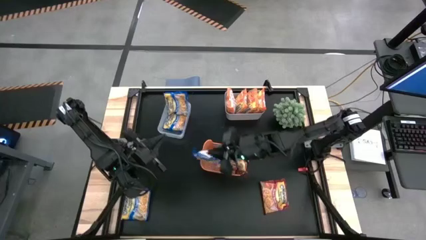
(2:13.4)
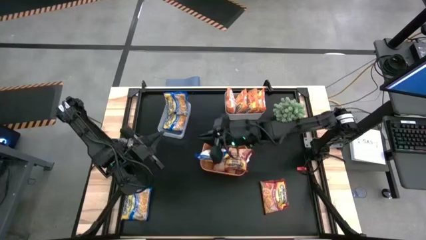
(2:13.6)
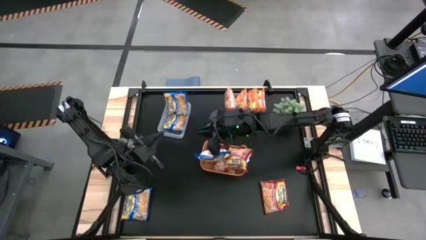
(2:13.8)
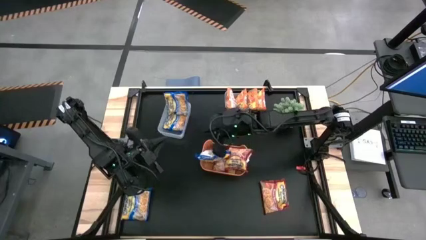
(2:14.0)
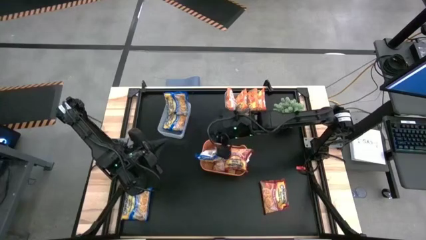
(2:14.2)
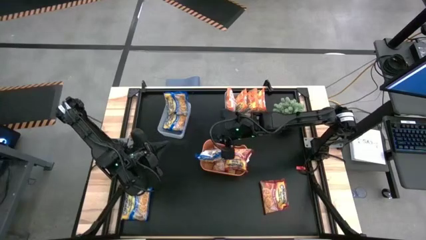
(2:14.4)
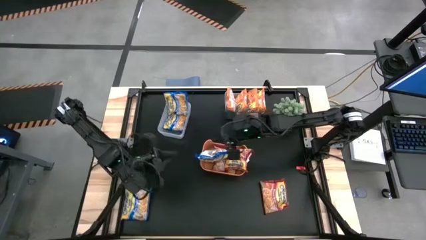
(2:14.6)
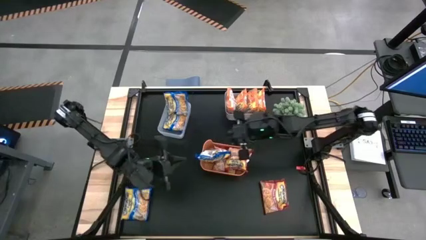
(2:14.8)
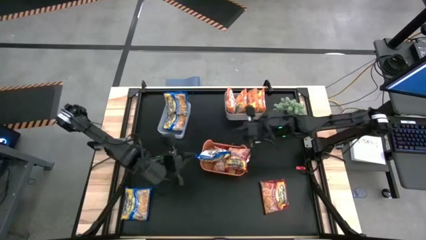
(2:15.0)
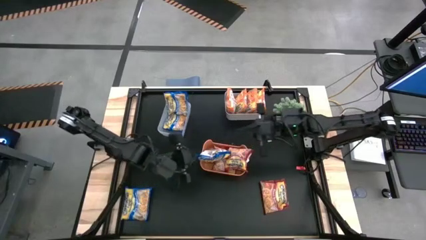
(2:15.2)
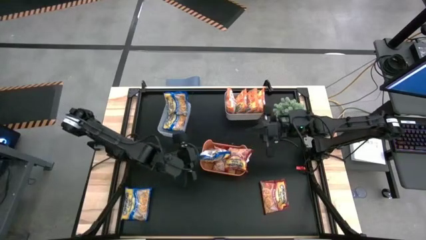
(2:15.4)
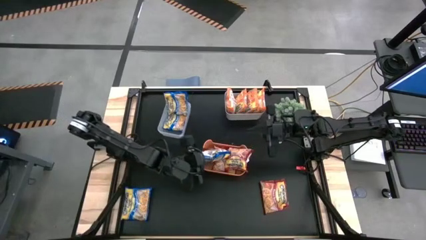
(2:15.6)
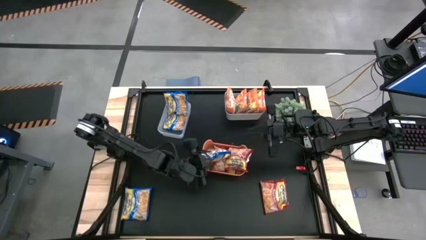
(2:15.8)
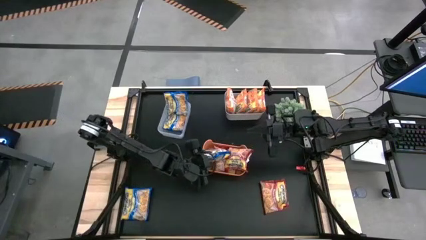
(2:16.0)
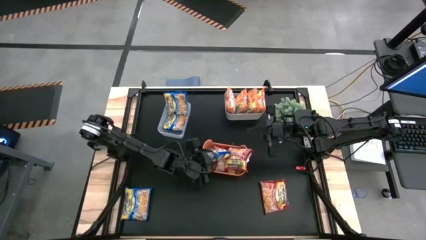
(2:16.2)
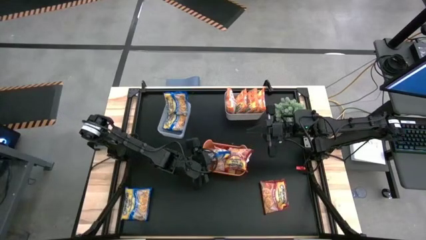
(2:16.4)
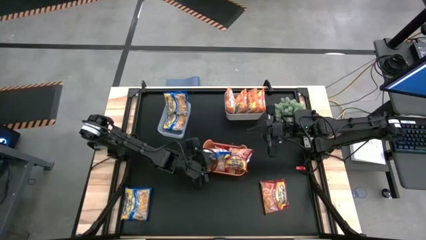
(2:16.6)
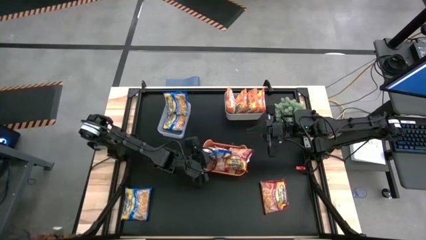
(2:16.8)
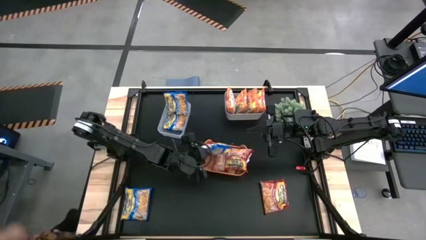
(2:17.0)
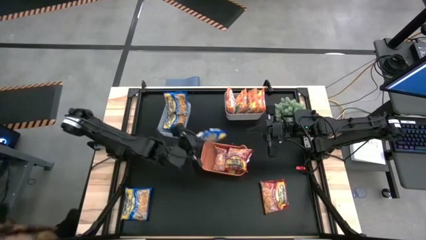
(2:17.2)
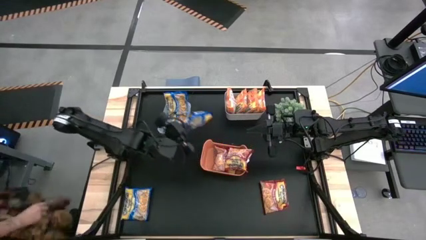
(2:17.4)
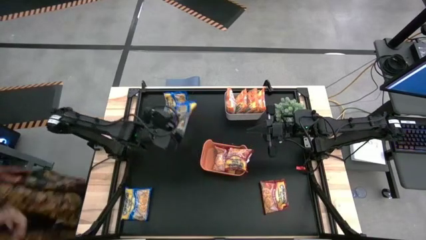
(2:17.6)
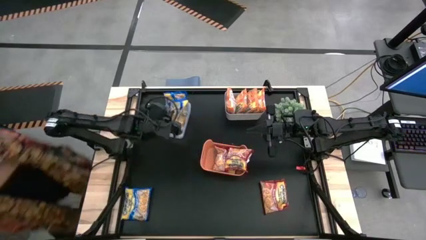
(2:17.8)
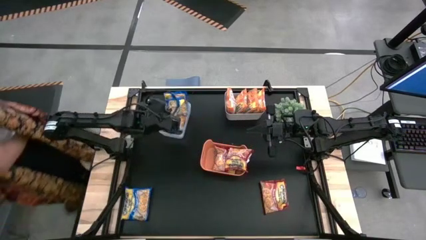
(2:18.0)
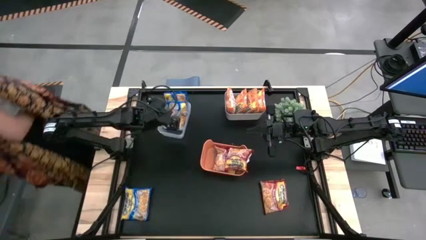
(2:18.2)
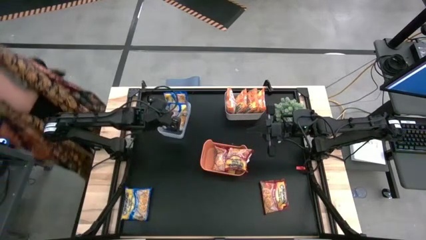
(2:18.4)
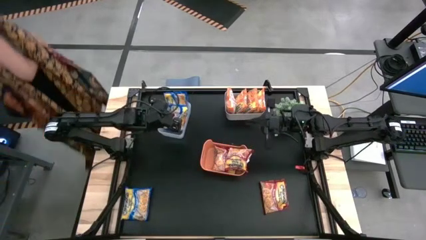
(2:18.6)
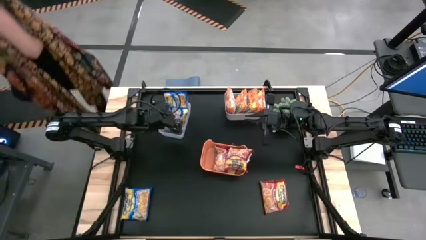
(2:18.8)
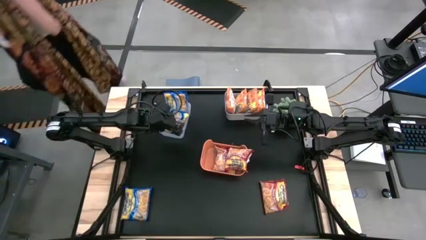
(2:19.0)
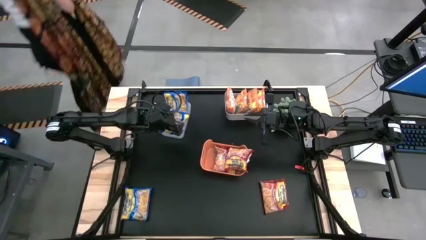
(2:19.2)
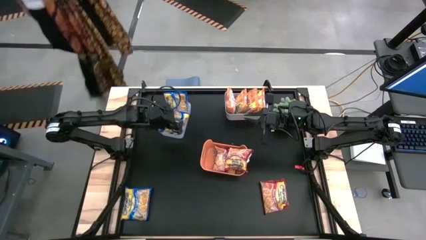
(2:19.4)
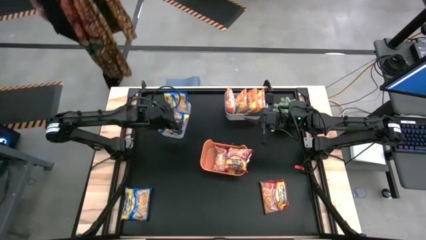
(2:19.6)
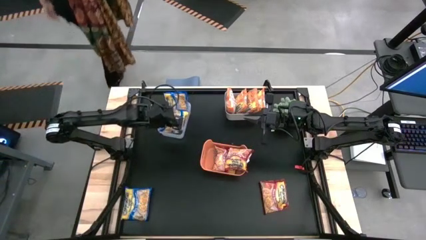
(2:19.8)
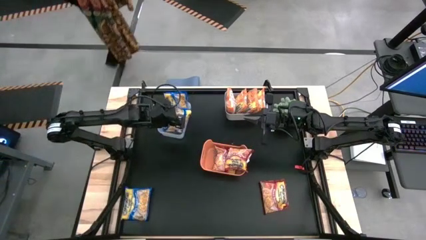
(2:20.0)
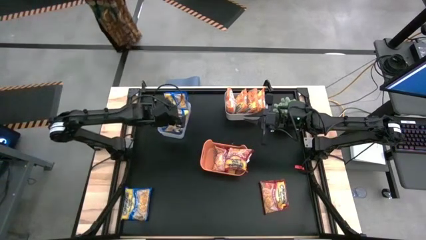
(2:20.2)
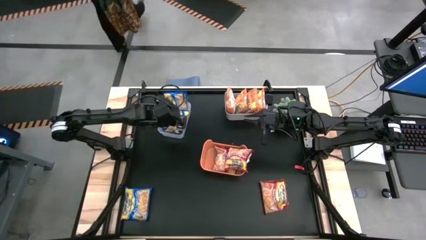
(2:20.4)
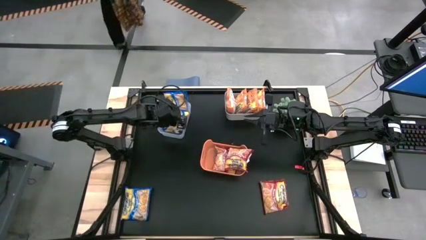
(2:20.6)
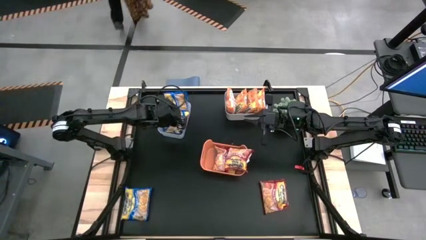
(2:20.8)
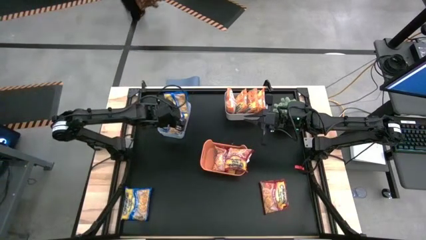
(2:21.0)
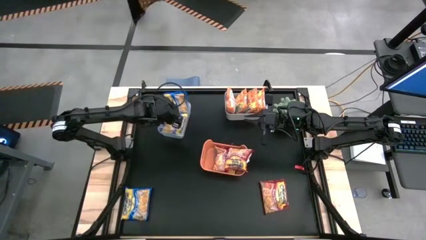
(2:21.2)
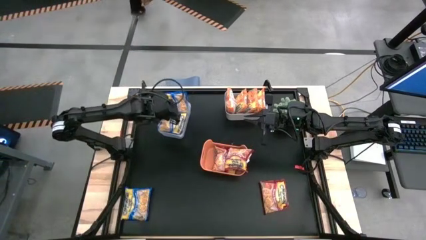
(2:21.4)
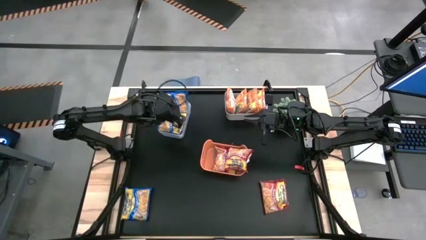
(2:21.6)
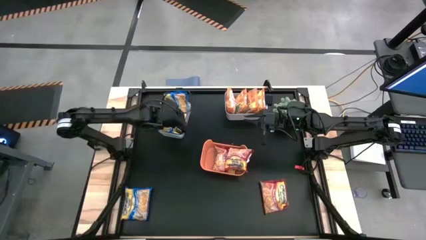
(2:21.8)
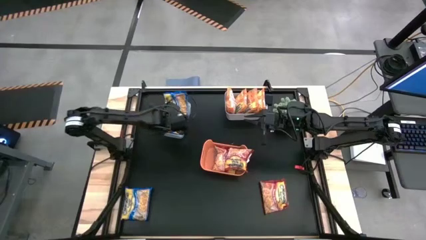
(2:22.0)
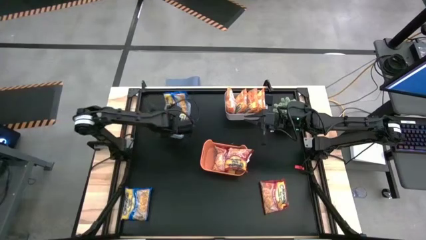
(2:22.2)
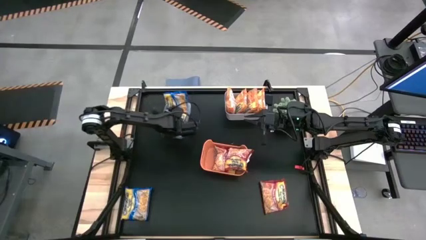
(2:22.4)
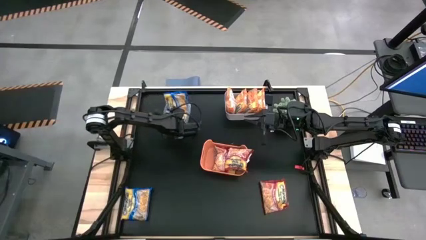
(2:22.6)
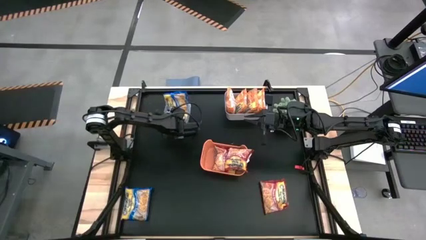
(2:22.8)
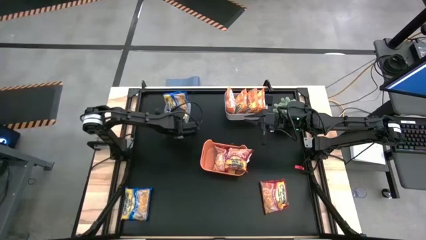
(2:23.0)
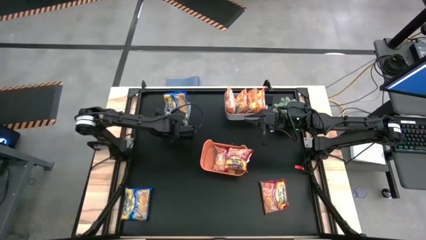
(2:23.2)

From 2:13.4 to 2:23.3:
Task: Sort Maruchan noodles
Put the right blue noodle packet into the transparent bin
